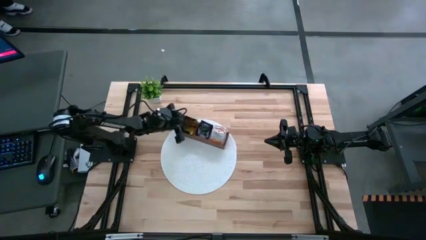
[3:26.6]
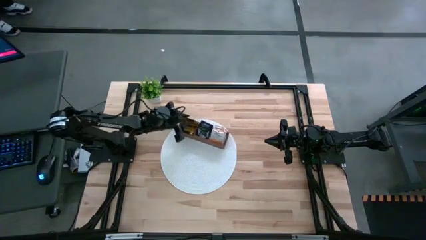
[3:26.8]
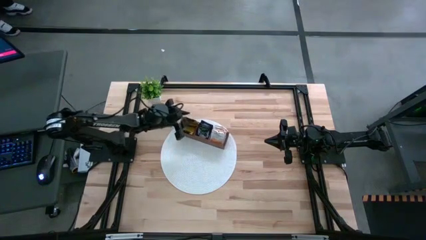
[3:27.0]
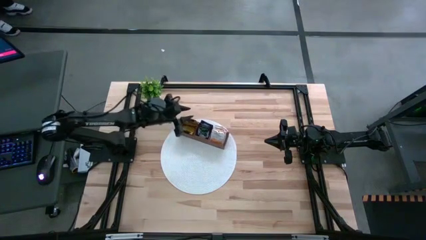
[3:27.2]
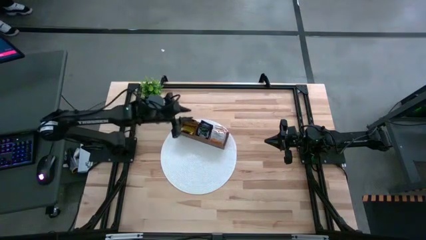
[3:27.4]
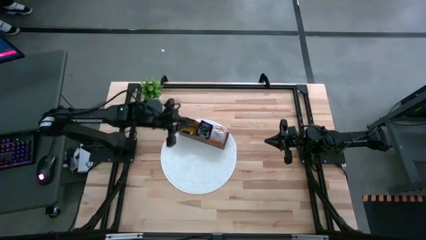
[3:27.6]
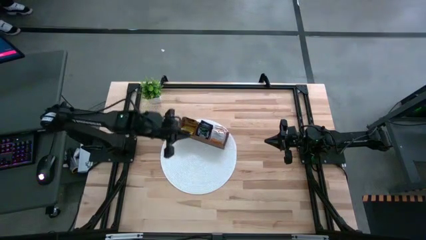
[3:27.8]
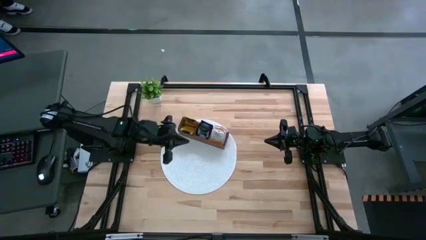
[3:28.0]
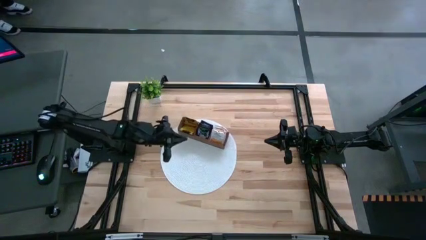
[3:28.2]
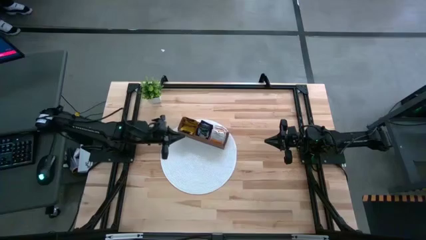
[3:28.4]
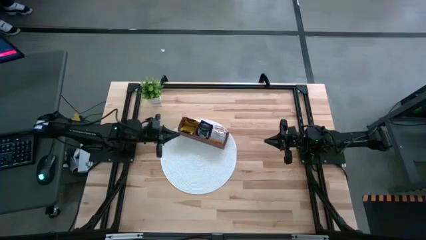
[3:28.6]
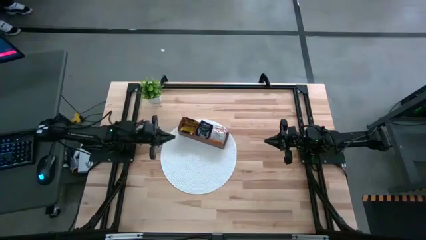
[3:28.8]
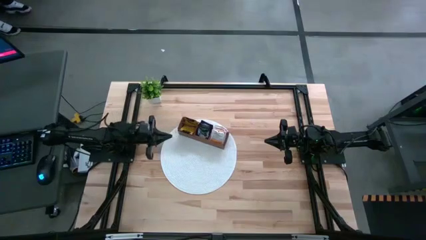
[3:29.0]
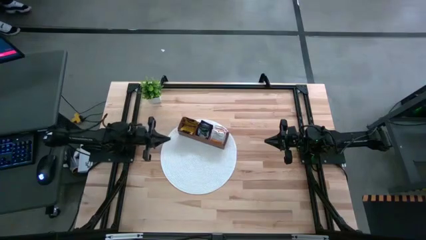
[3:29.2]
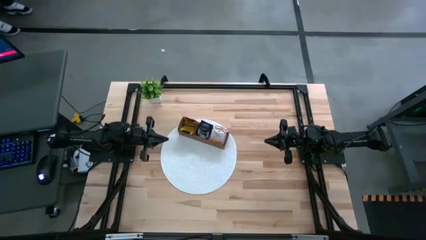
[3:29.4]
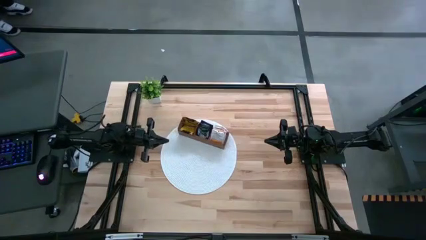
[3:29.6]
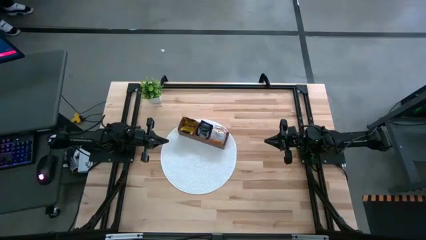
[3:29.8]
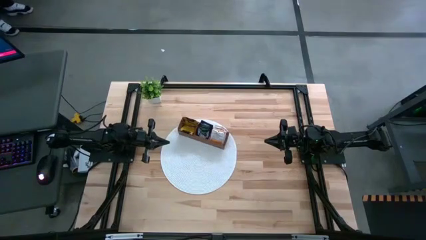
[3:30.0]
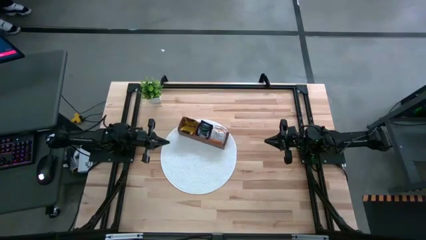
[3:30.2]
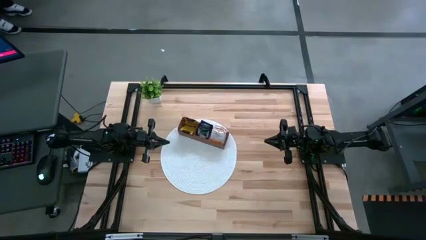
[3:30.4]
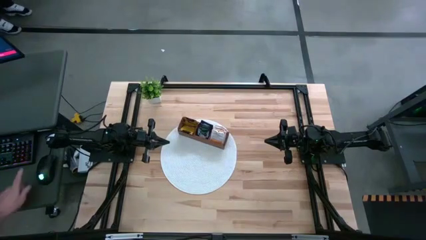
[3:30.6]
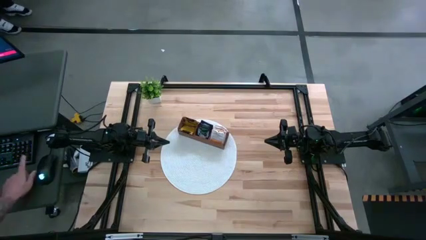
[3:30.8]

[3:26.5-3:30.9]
Task: Pick & Place Tea
Return to Home Position

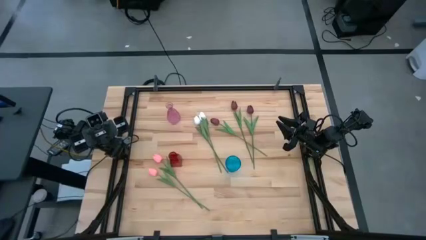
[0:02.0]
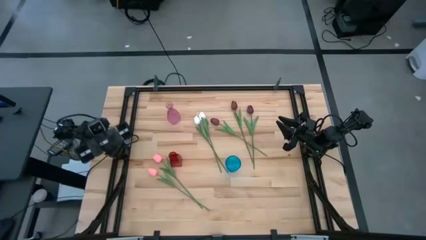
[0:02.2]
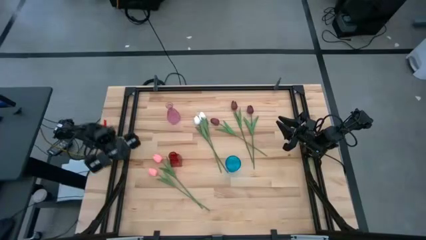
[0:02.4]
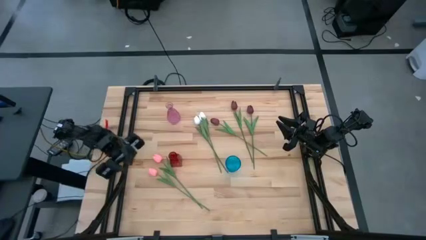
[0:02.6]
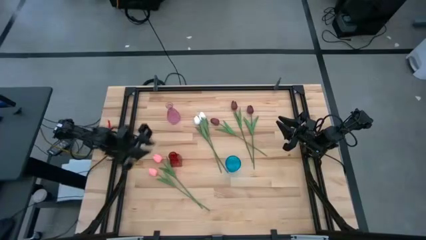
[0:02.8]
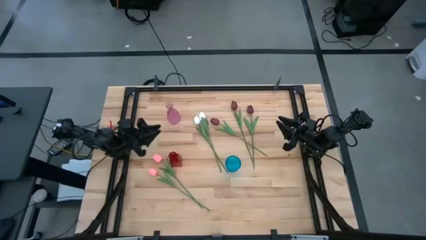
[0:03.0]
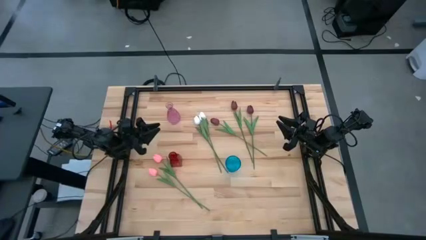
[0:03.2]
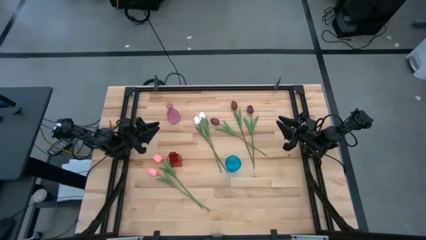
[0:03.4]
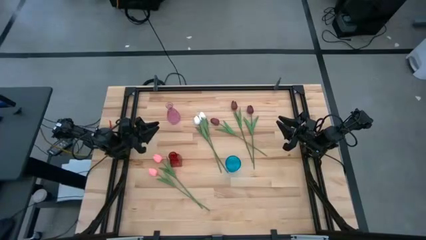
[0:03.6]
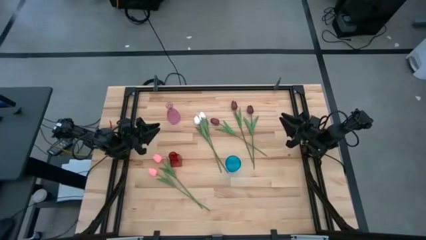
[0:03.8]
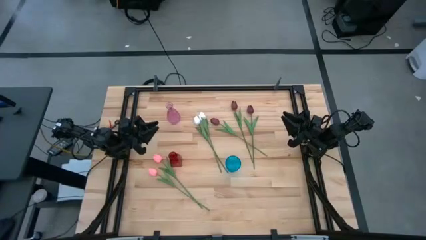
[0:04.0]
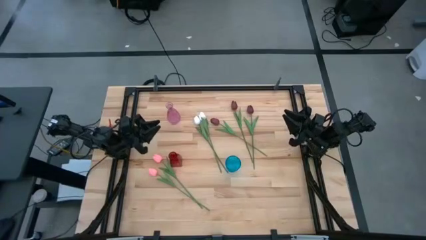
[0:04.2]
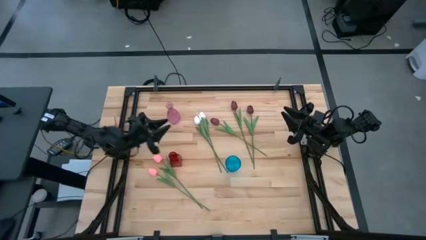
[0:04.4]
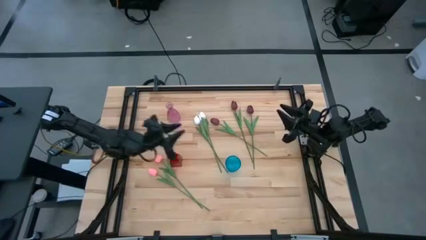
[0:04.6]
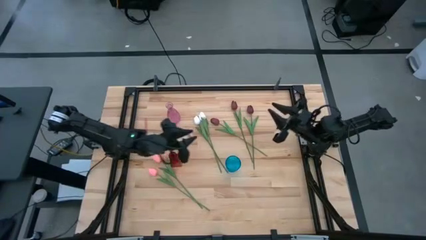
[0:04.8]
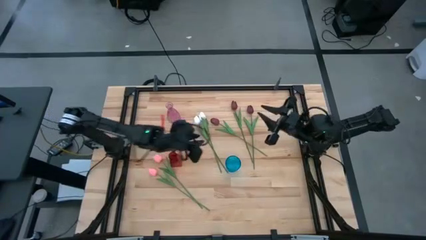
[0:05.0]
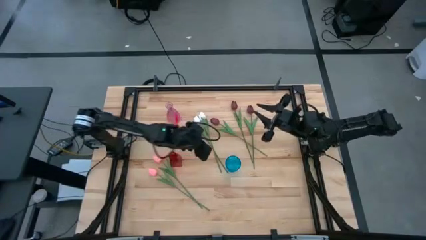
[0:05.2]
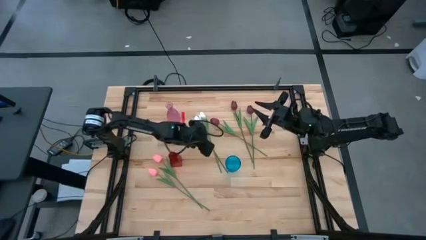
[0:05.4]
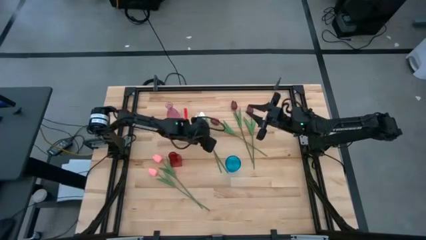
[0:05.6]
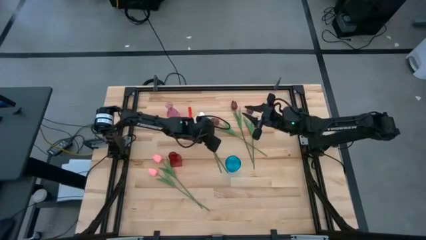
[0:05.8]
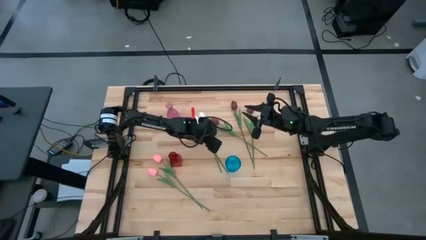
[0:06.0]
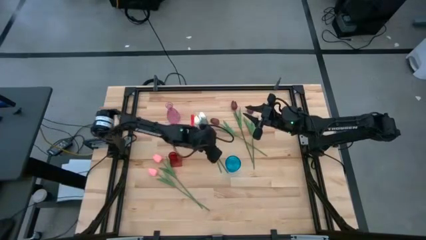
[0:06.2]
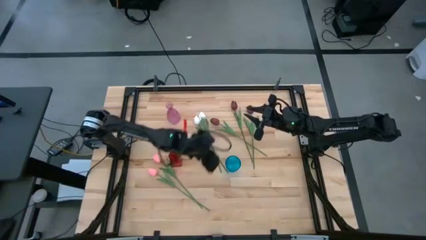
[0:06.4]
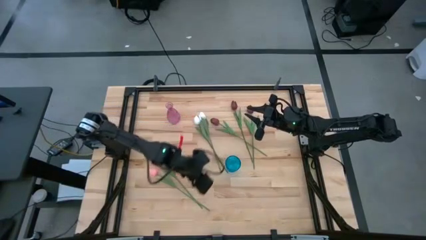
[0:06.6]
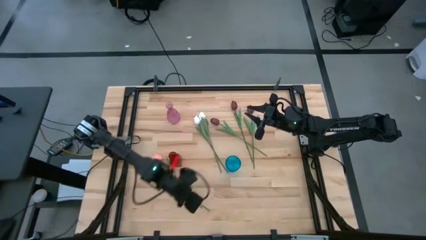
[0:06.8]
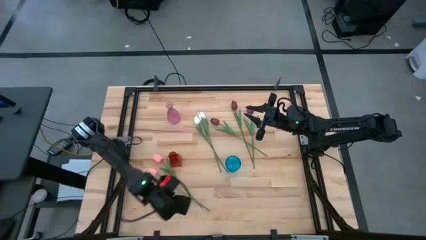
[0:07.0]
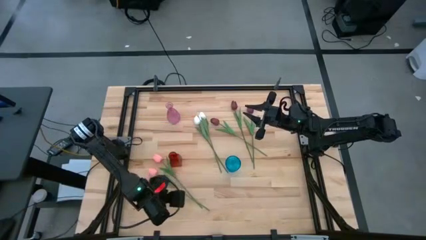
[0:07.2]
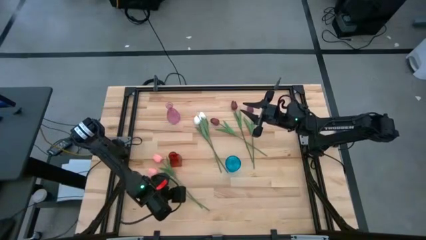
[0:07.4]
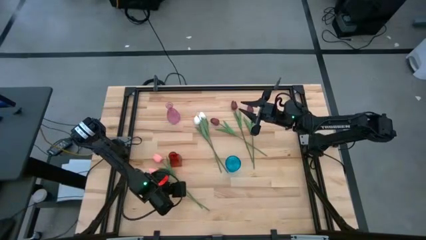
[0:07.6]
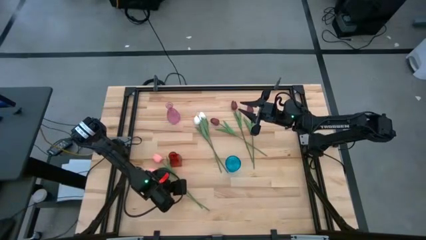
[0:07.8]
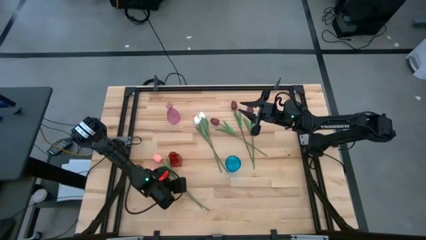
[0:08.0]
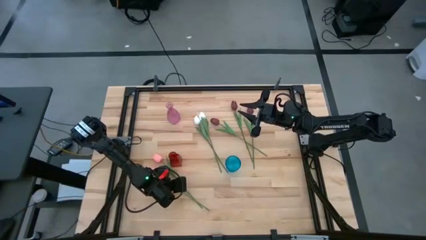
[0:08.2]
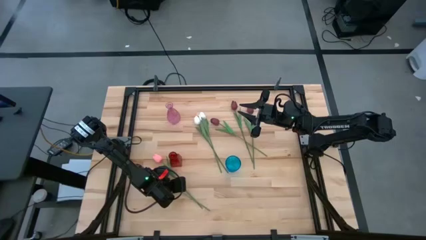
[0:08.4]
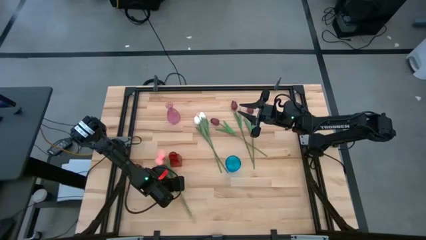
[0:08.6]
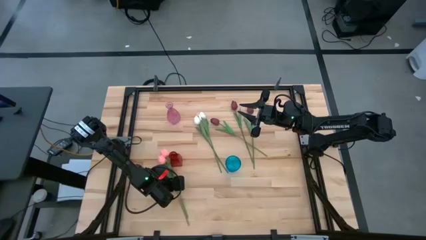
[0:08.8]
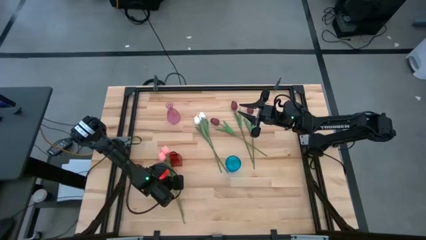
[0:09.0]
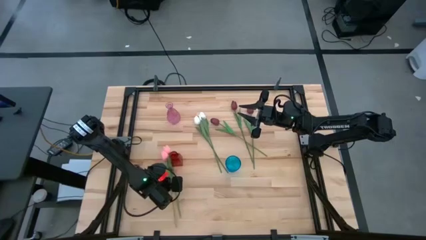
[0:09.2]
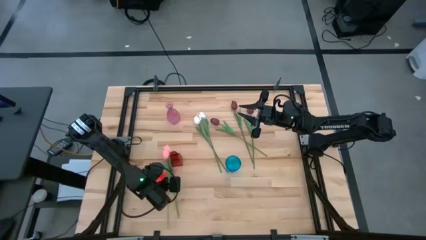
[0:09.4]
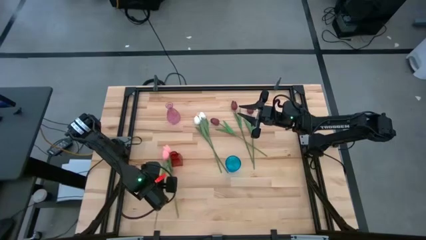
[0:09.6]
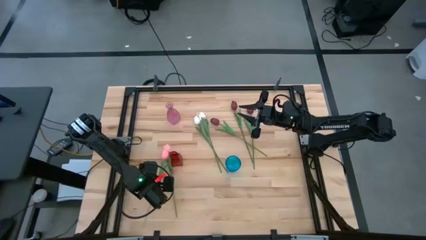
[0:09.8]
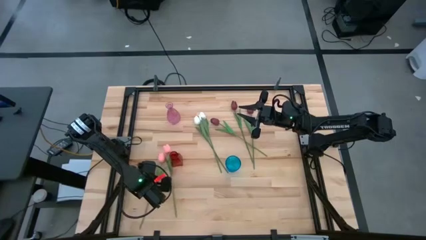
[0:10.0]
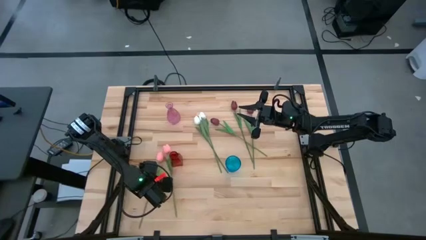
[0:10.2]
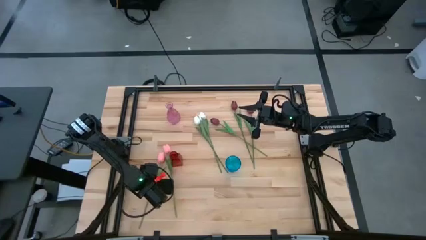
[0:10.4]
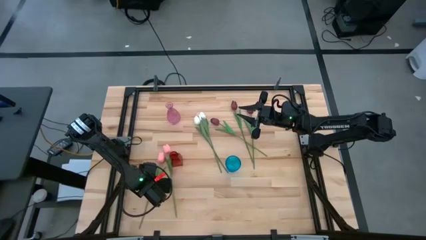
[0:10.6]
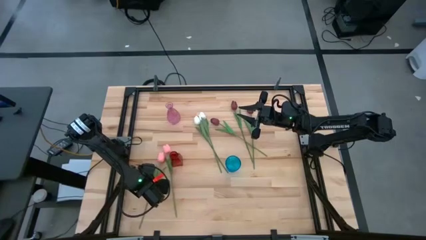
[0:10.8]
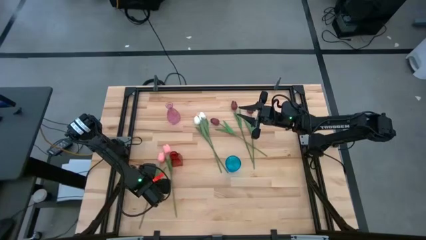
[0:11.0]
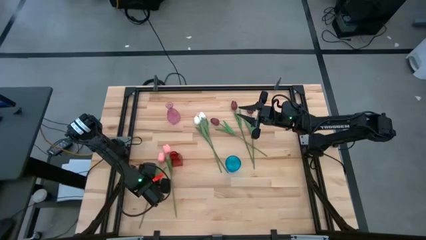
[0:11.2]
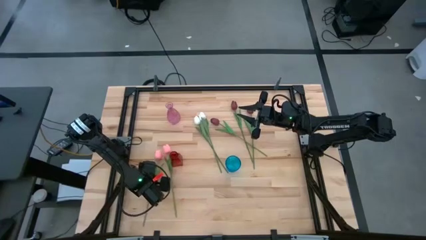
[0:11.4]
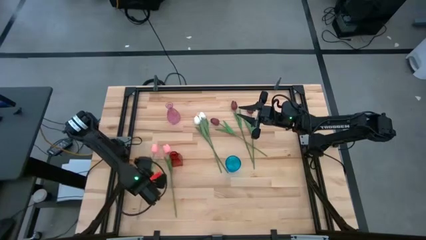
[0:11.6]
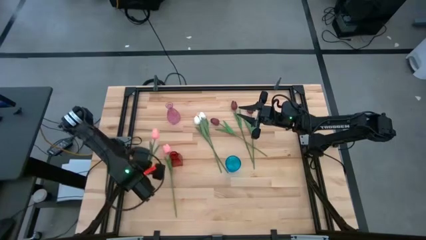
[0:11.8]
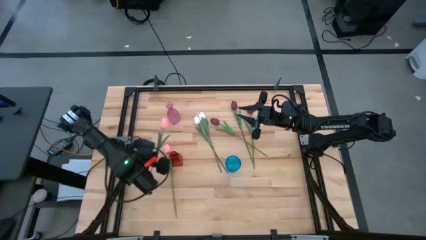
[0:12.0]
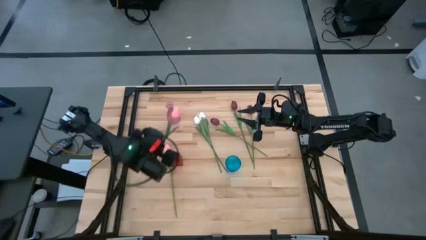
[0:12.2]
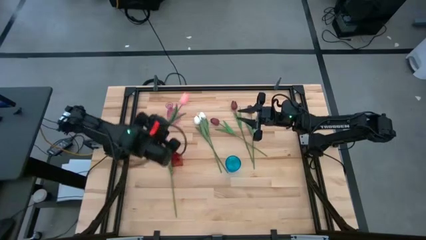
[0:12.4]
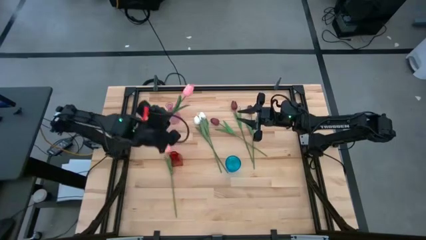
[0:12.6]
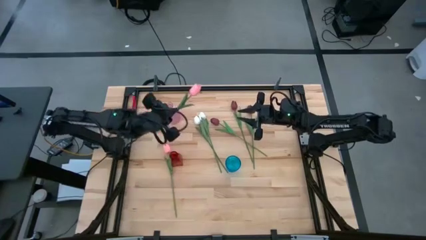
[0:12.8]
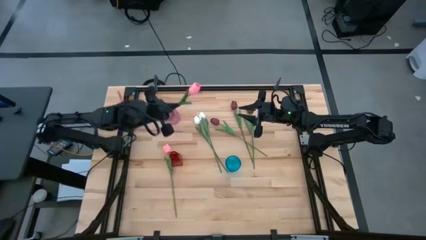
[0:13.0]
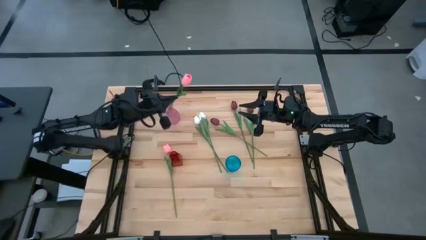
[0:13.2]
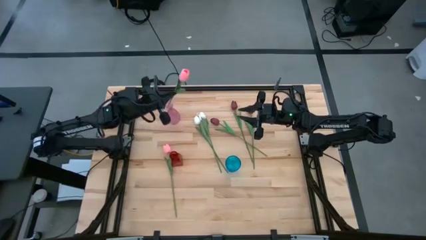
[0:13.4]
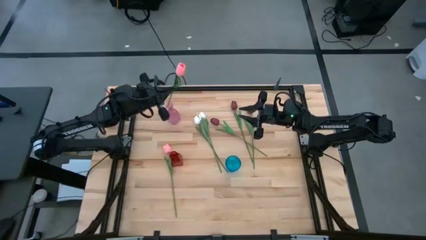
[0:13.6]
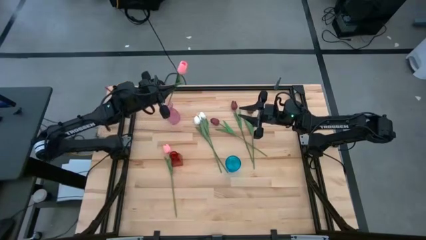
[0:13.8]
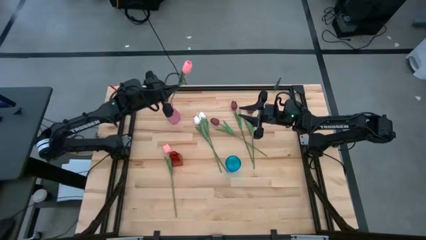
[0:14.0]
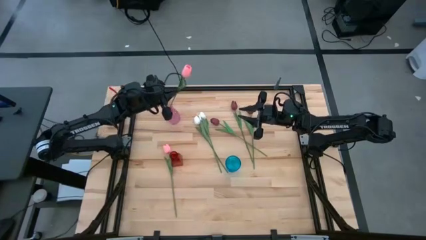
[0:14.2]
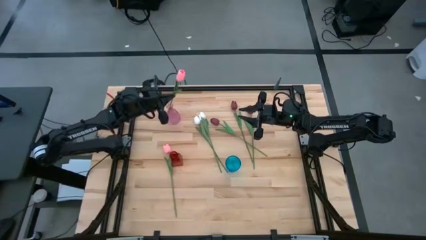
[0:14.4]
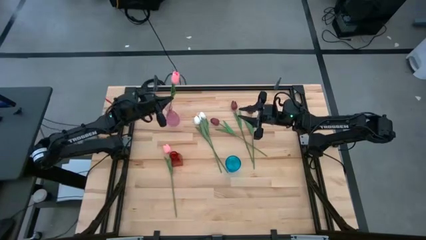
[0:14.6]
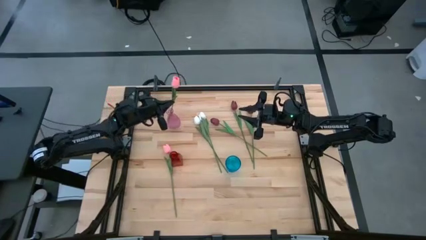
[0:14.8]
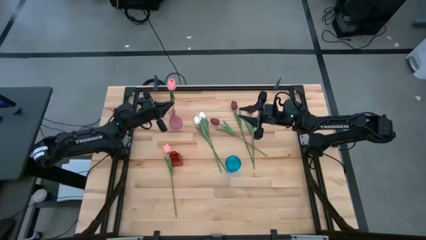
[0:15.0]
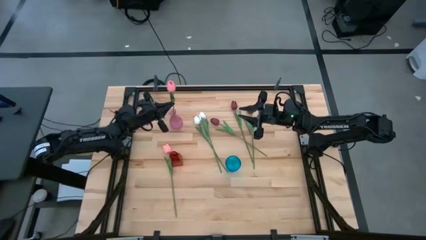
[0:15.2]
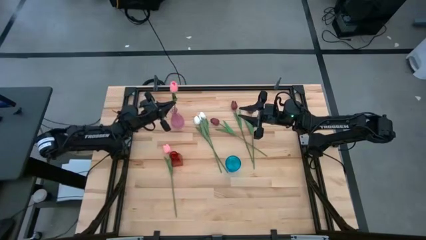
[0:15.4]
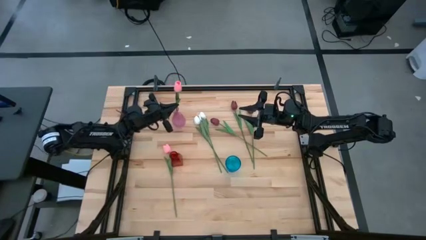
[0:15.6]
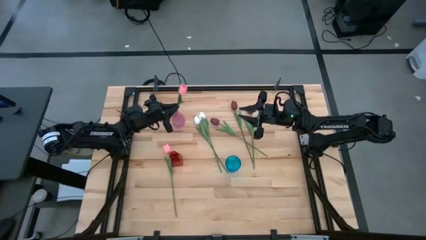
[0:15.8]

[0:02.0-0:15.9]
Task: Sort flowers into vase by color
Put the left pink flower into the pink vase
